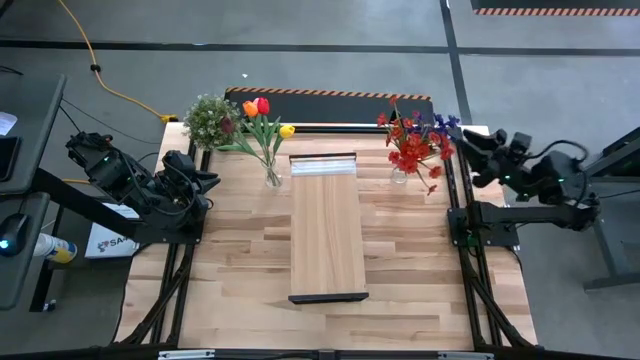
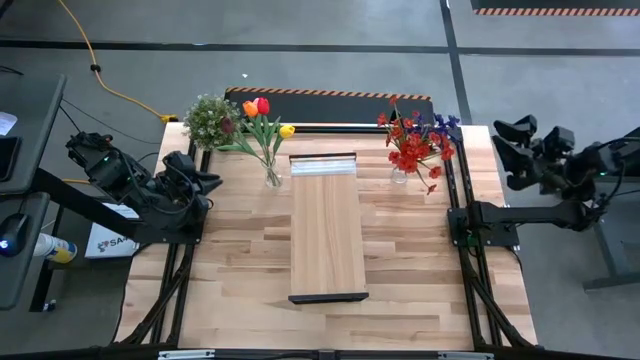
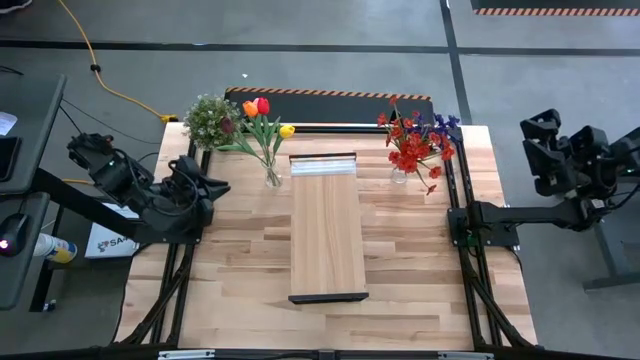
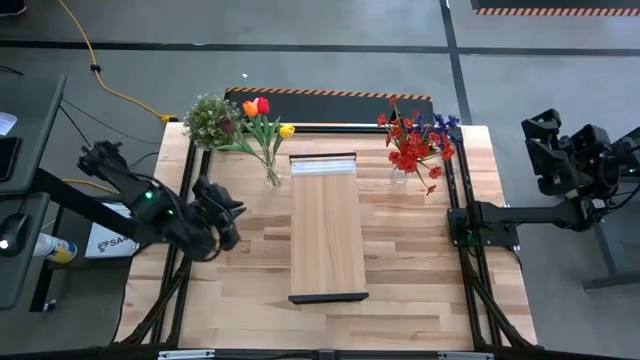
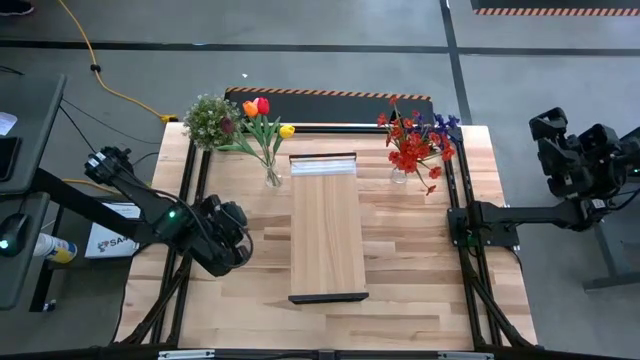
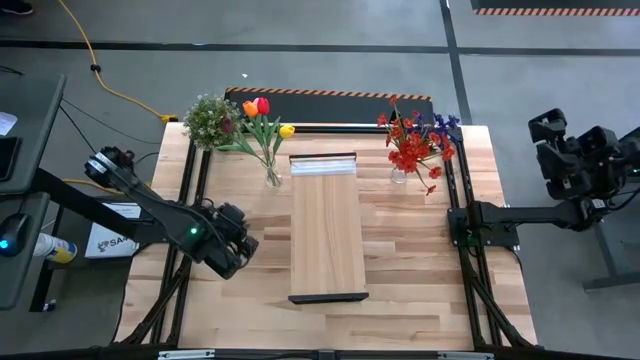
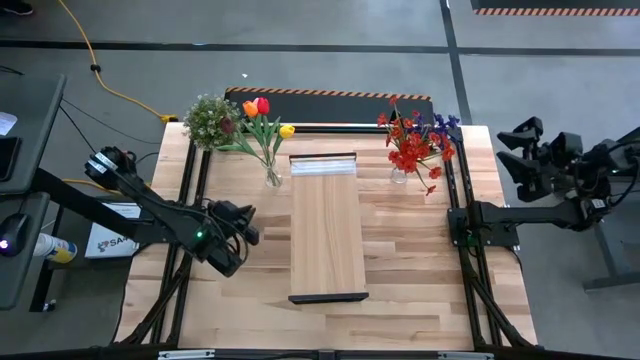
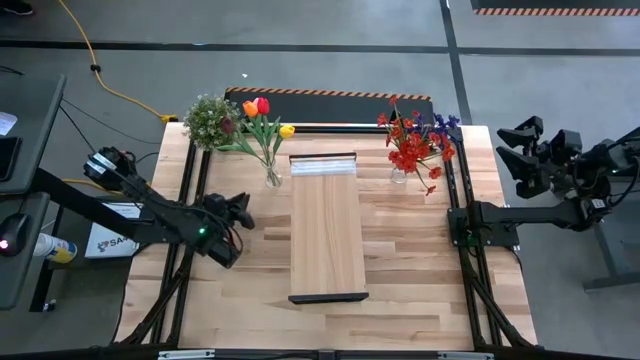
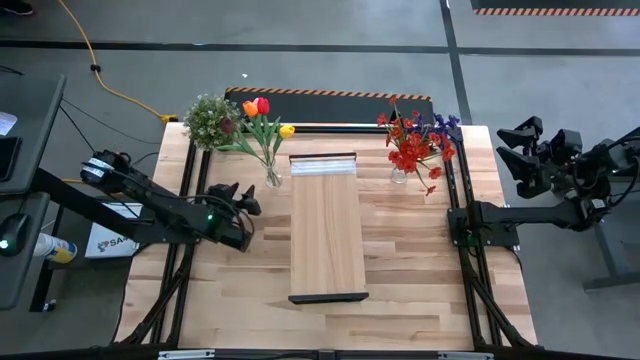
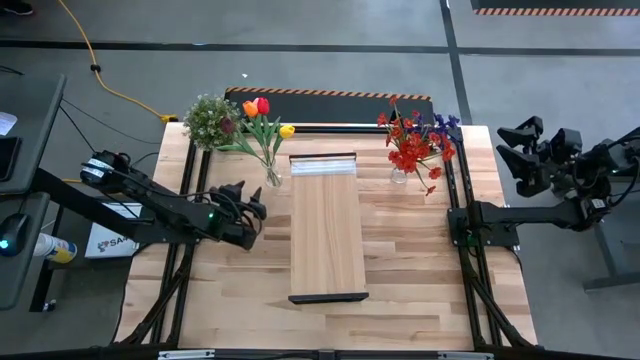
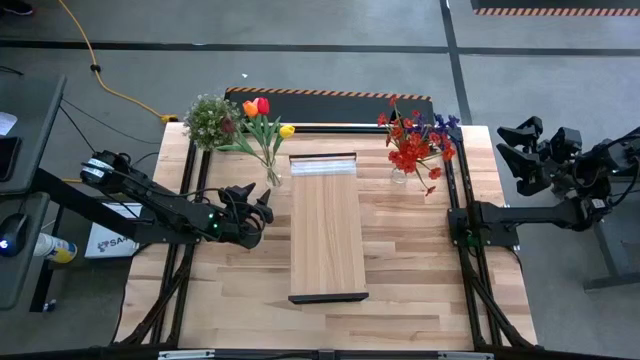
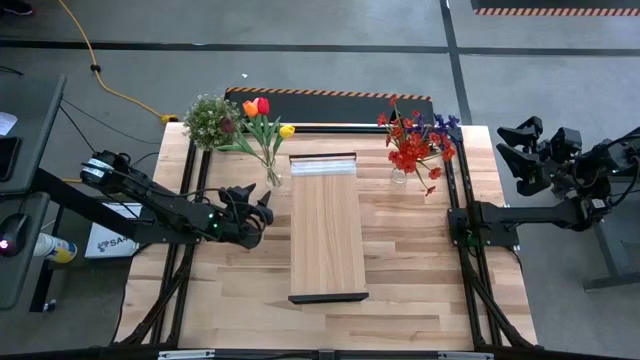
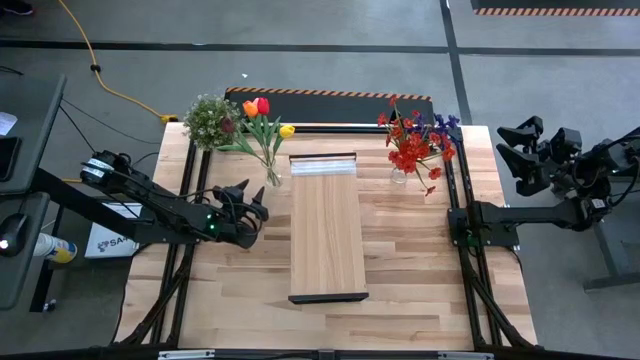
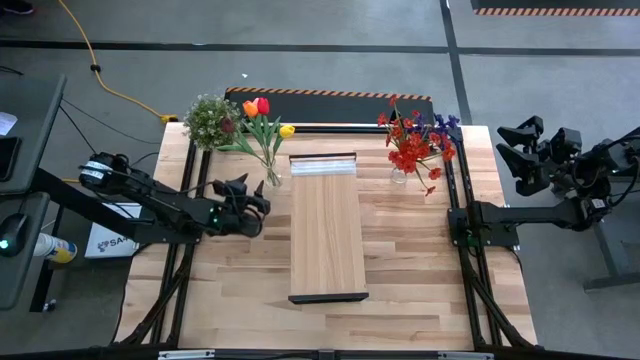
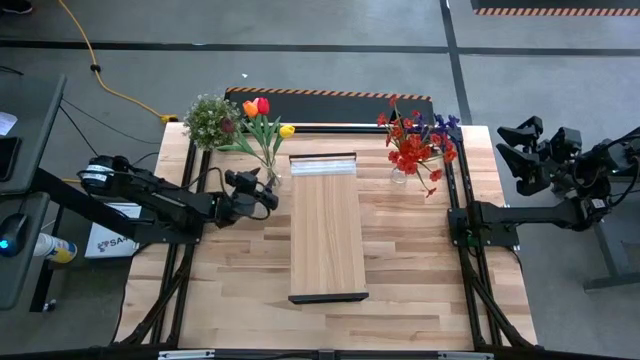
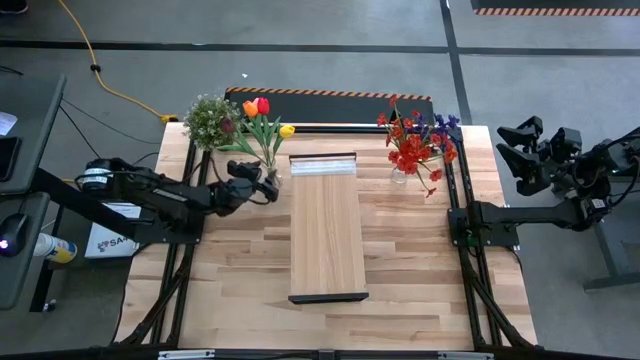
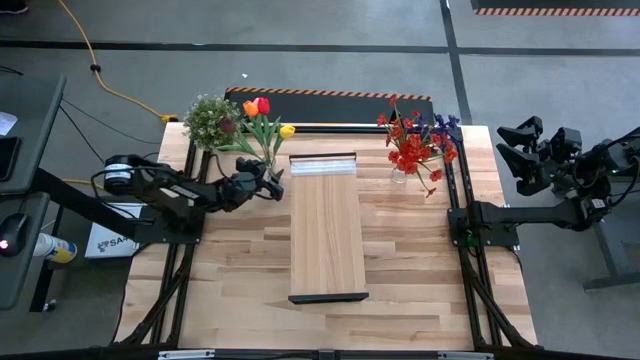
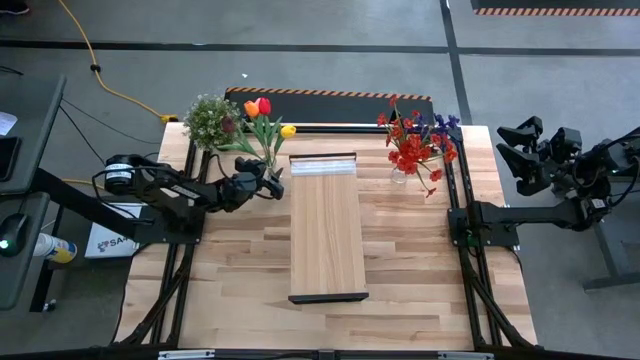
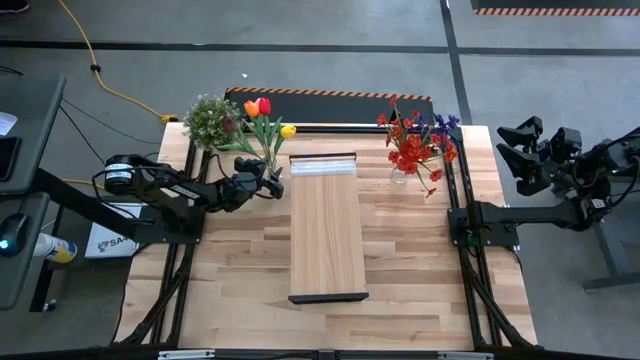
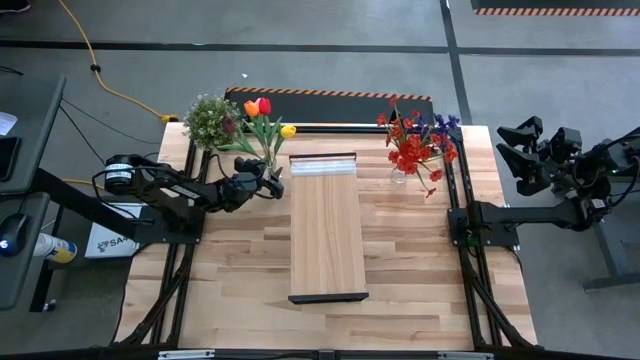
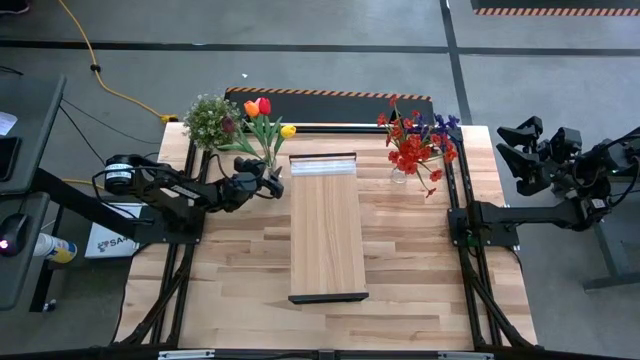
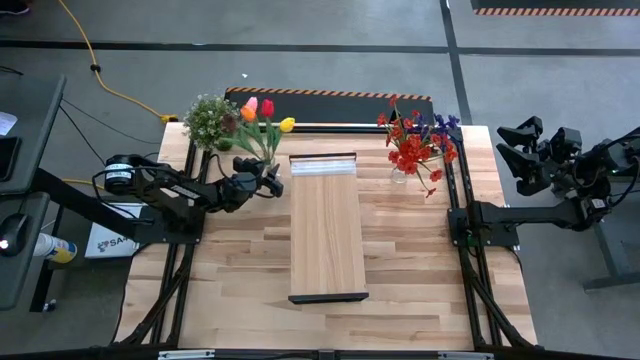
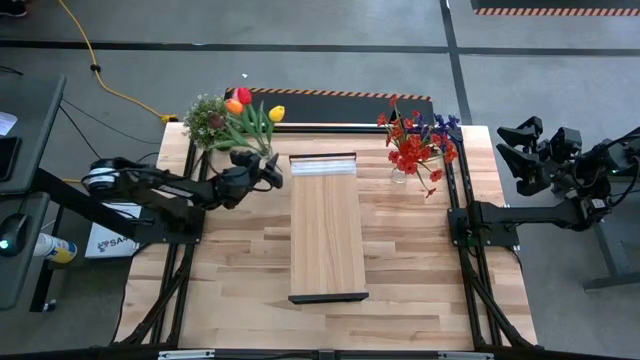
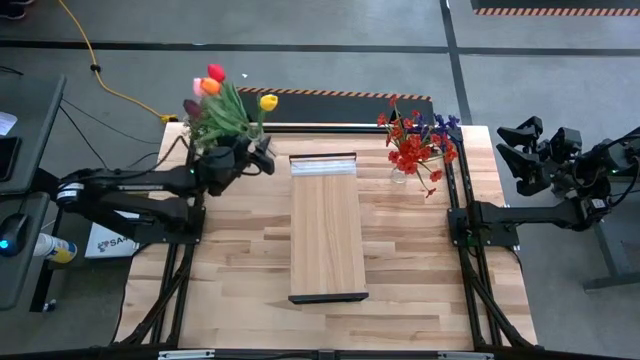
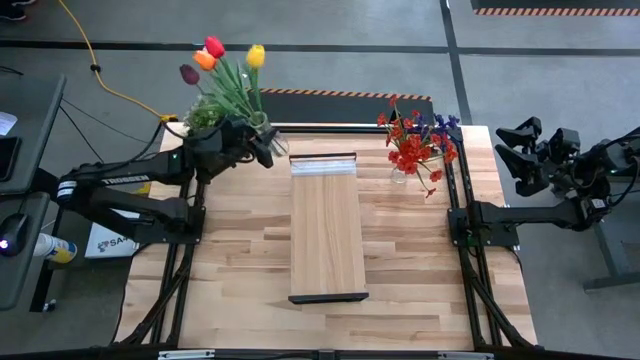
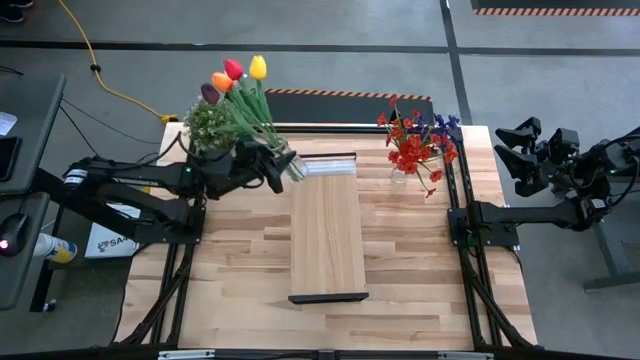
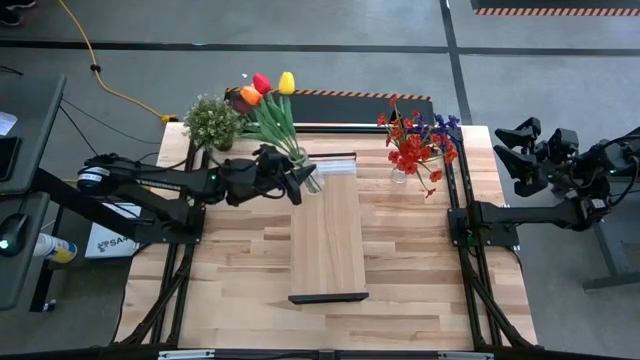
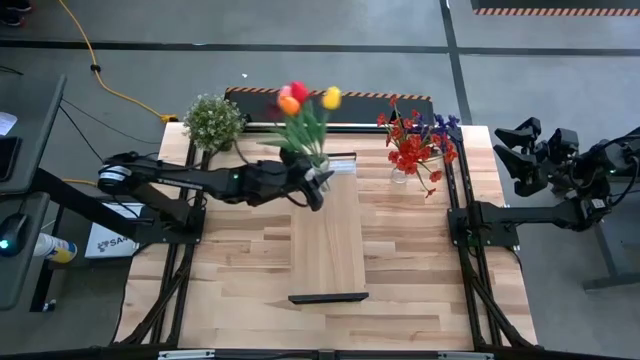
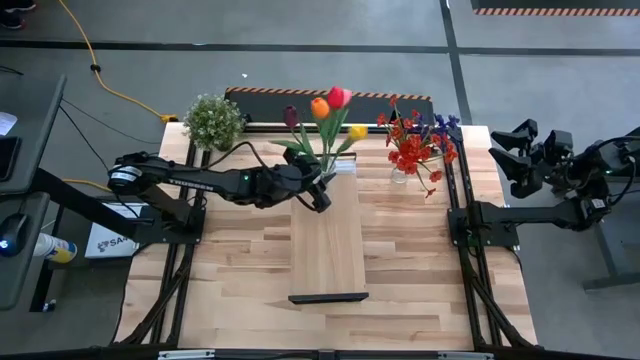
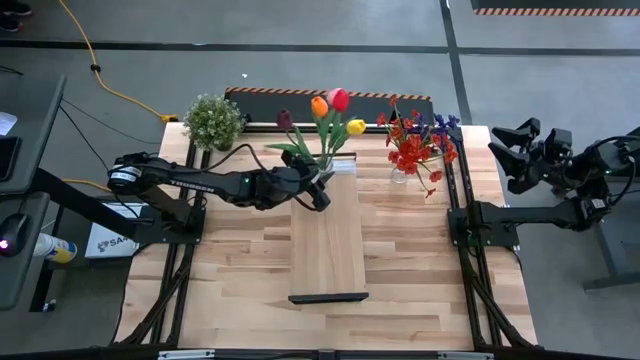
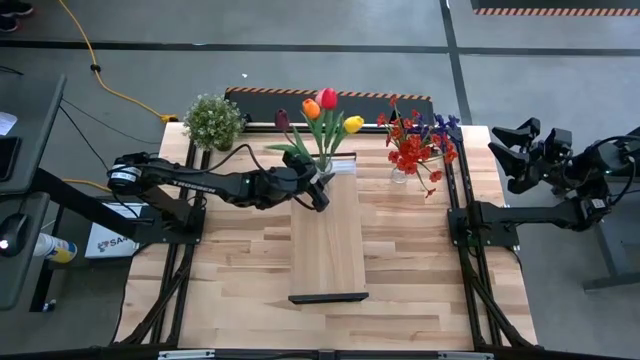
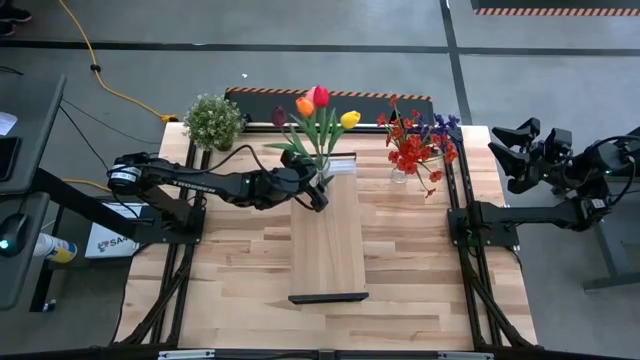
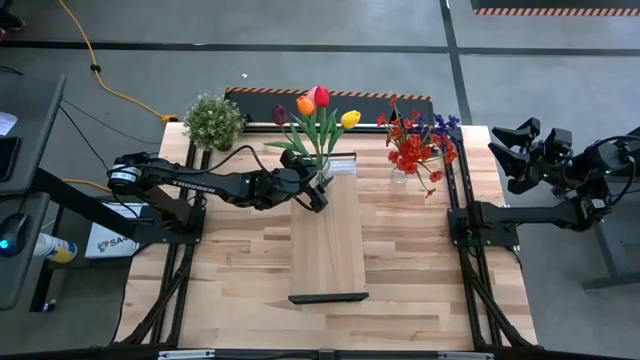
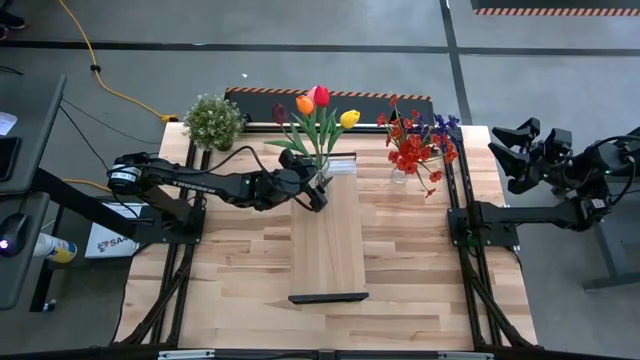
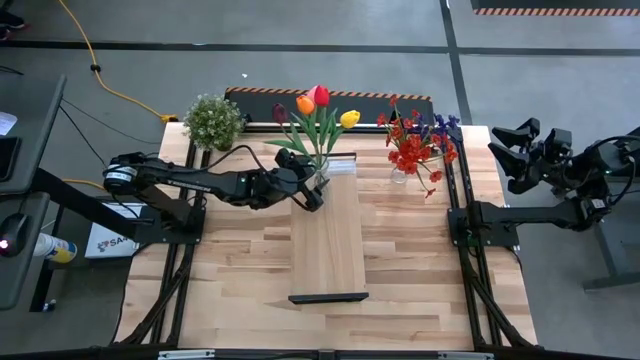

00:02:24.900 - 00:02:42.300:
Task: Pick and place flowers into a vace then onto a shelf
Put the left transparent vase with flowers on the shelf

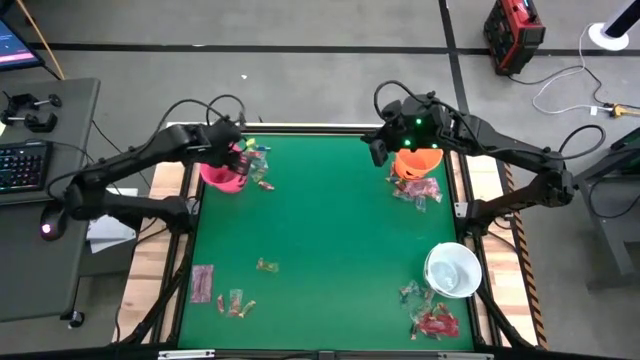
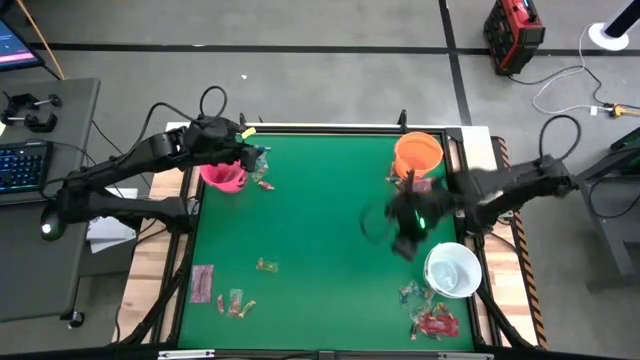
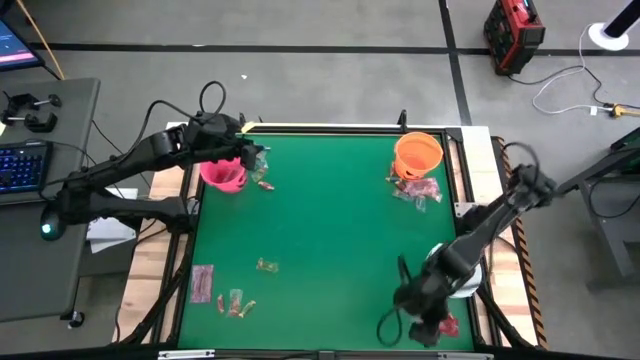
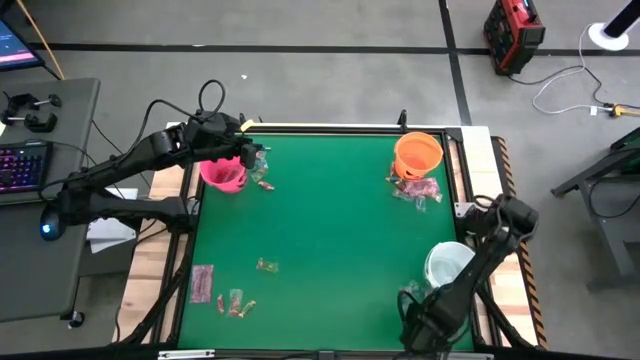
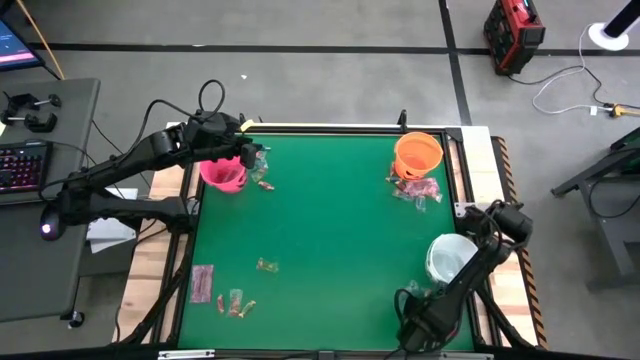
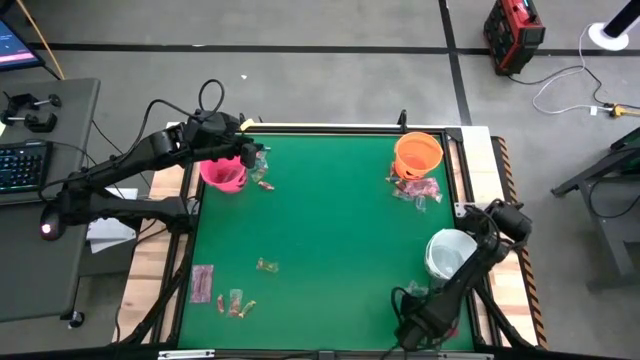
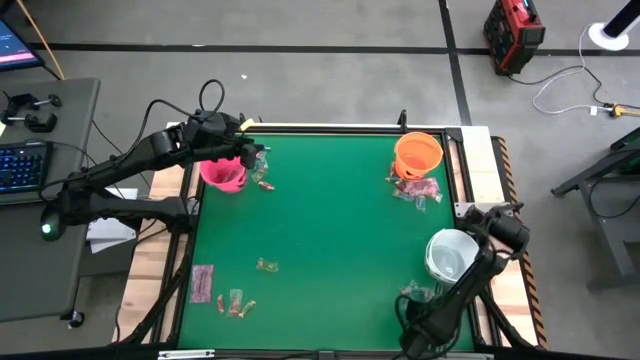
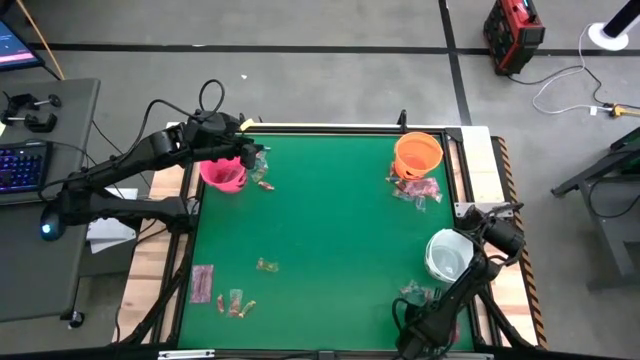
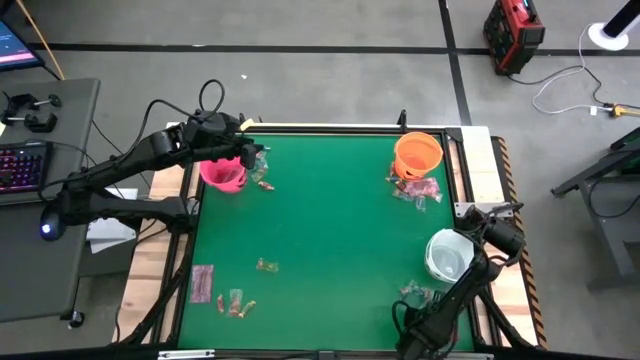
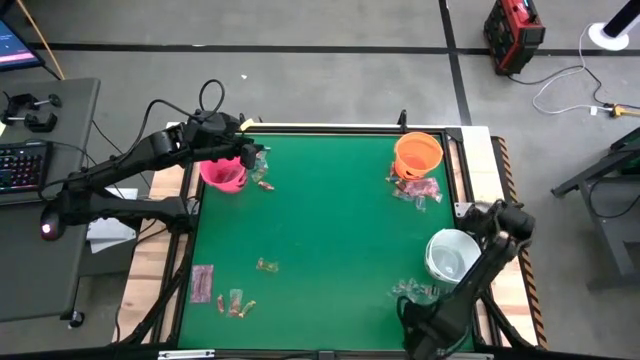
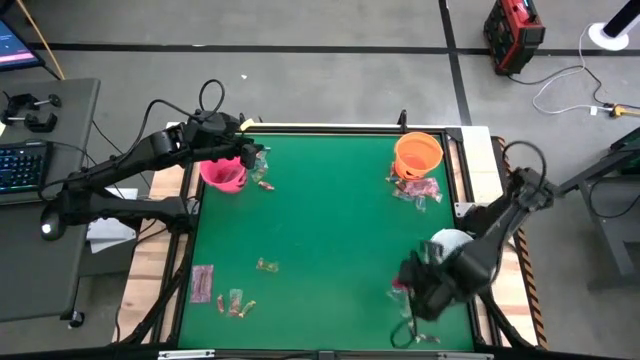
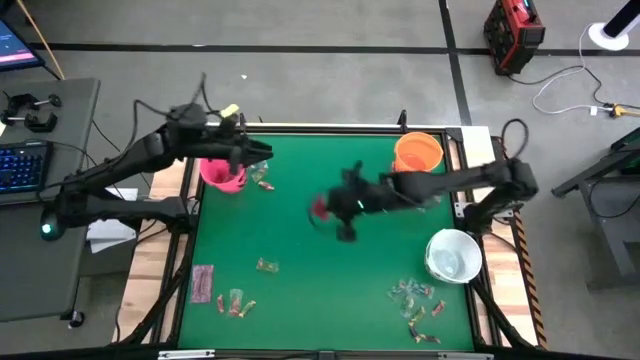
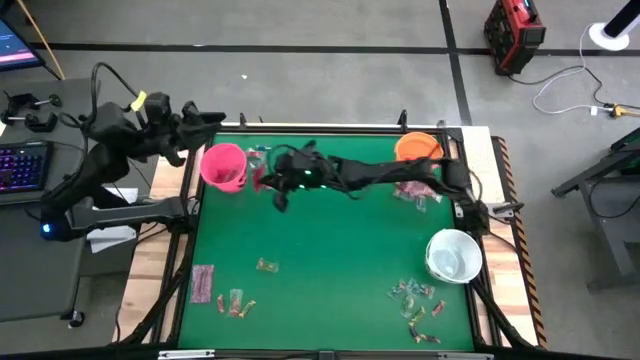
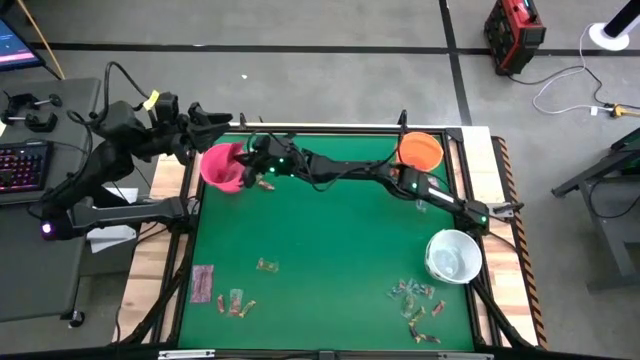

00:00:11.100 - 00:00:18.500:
Task: Sort candy by brand, put in halloween buckets
Put the red candy into the pink bucket
